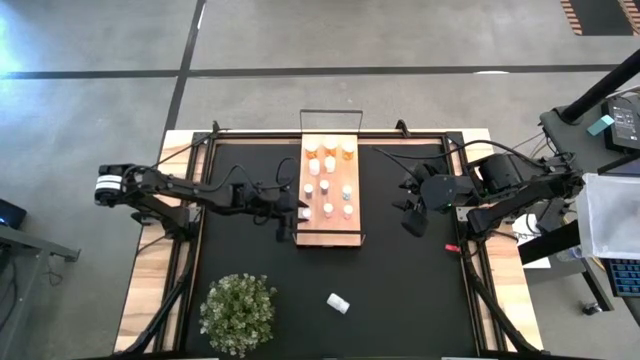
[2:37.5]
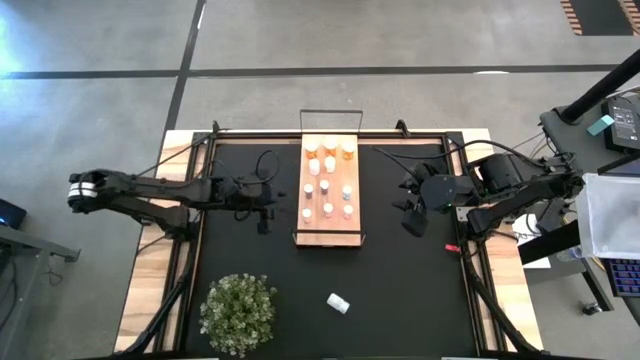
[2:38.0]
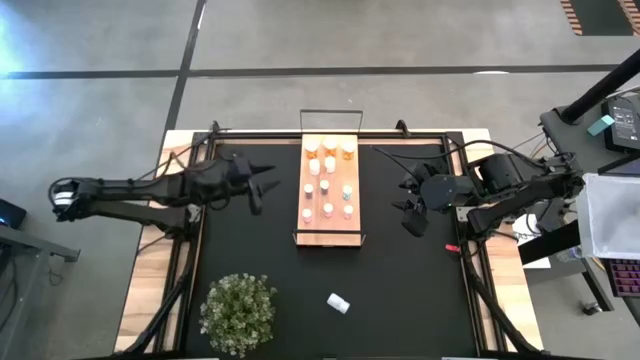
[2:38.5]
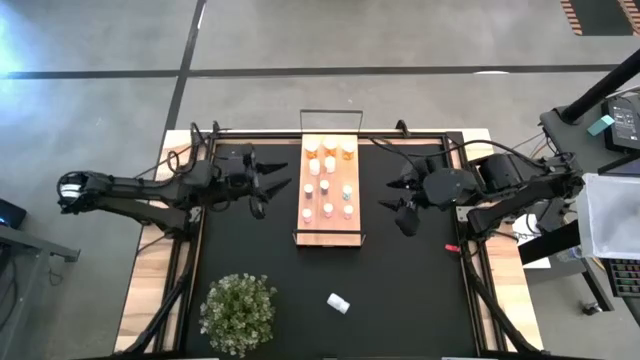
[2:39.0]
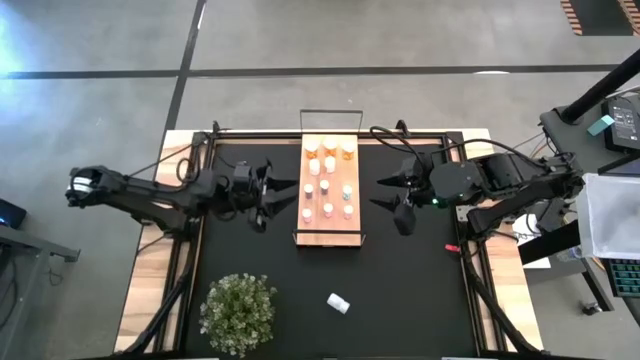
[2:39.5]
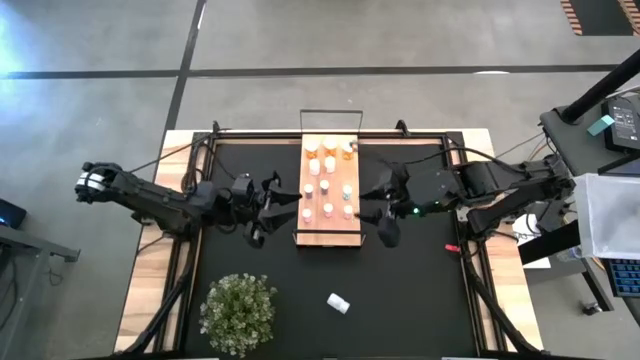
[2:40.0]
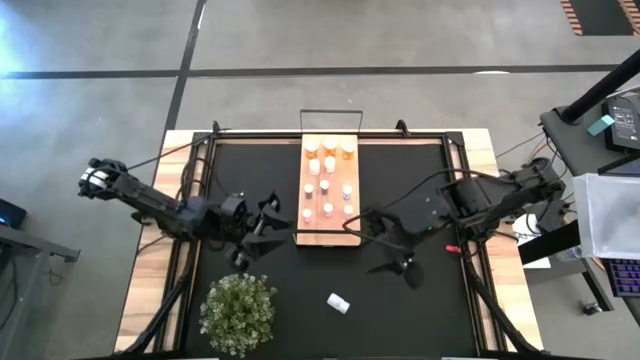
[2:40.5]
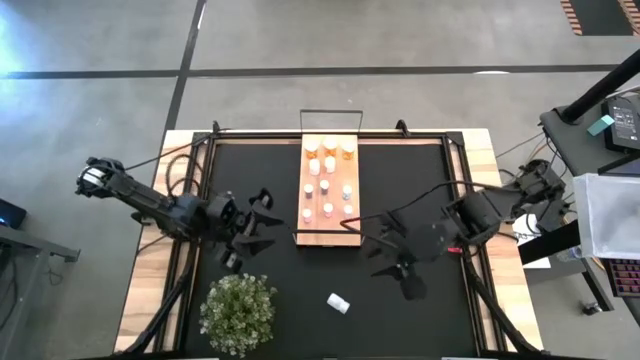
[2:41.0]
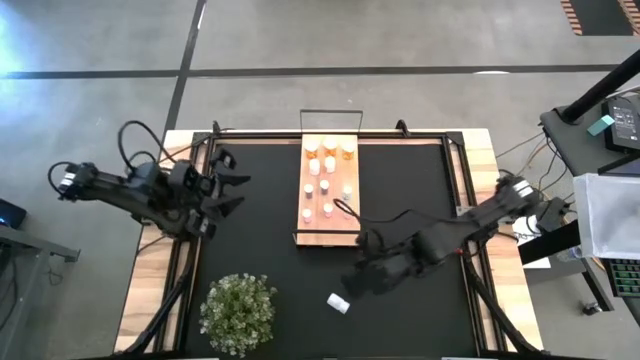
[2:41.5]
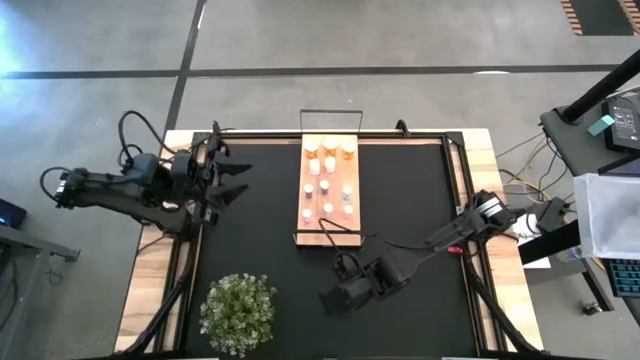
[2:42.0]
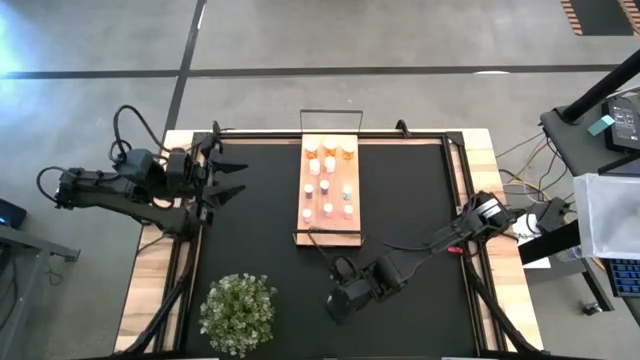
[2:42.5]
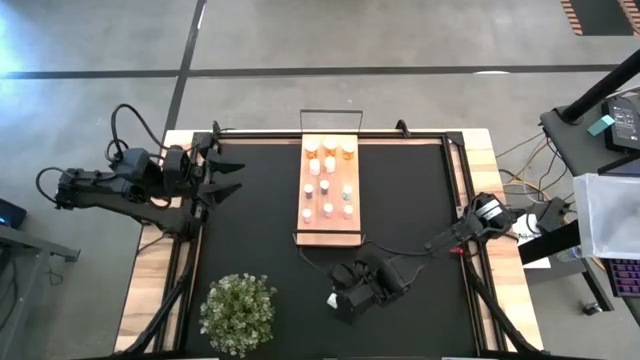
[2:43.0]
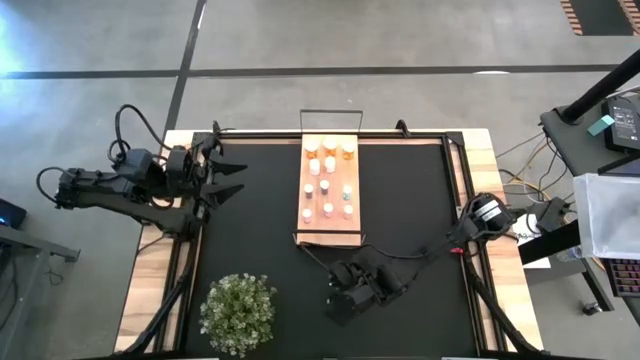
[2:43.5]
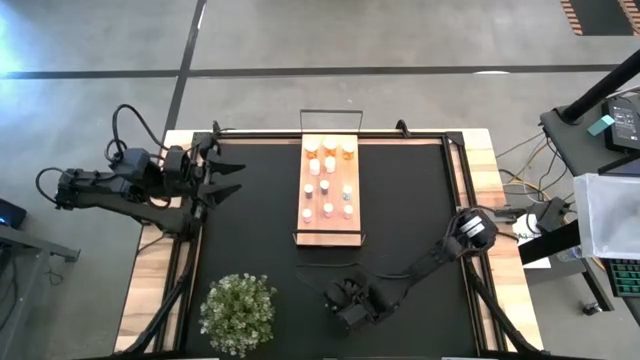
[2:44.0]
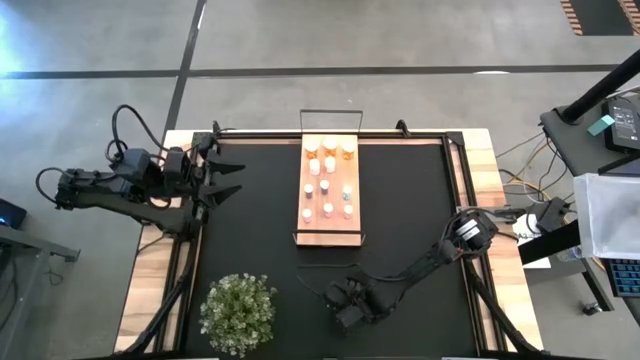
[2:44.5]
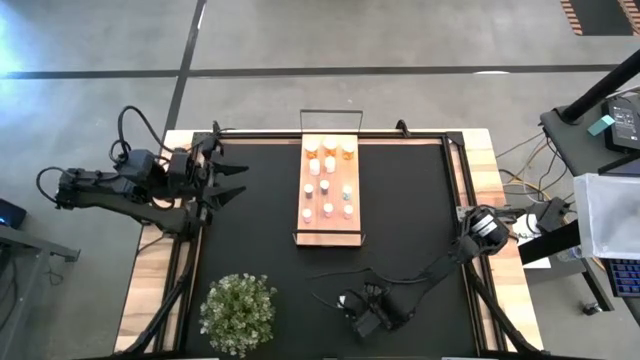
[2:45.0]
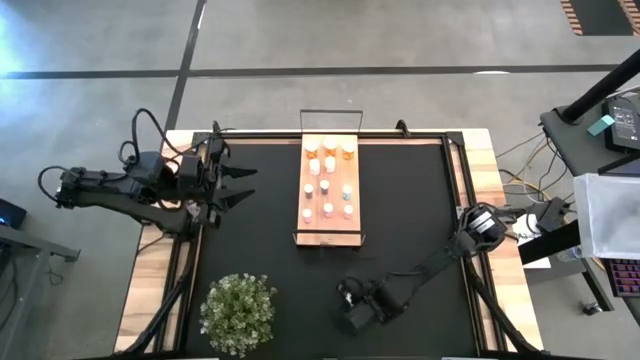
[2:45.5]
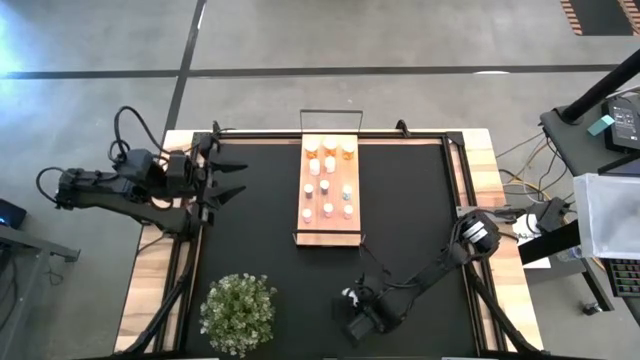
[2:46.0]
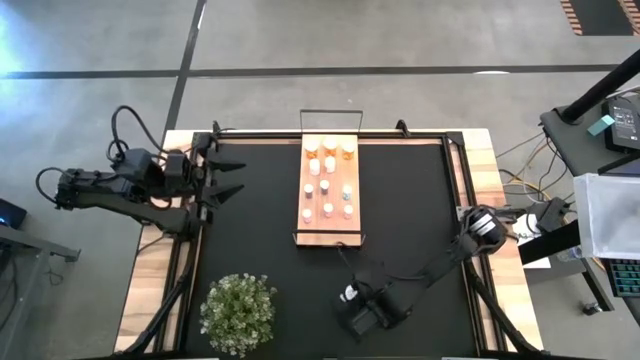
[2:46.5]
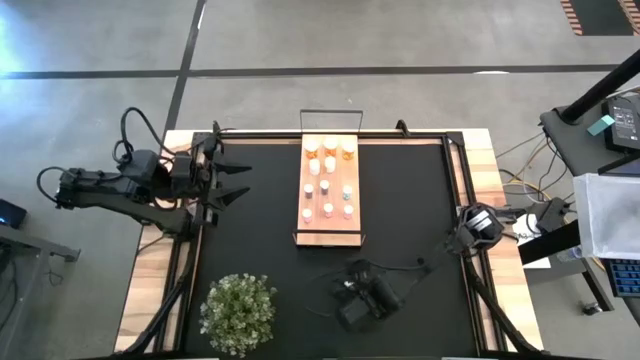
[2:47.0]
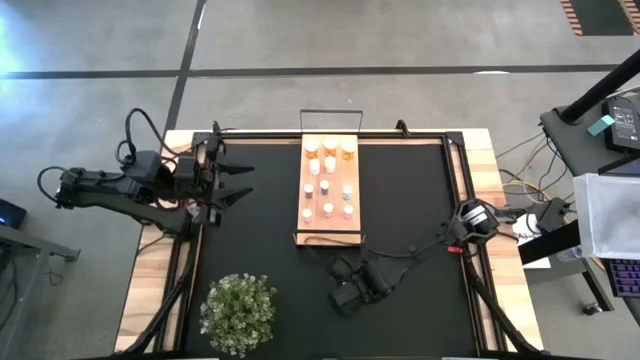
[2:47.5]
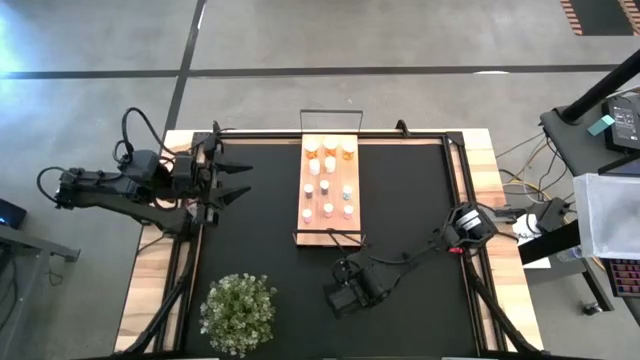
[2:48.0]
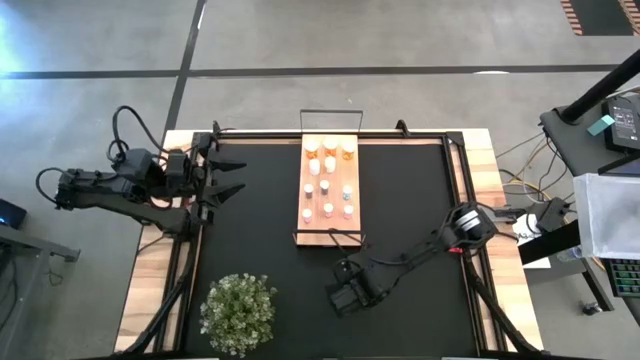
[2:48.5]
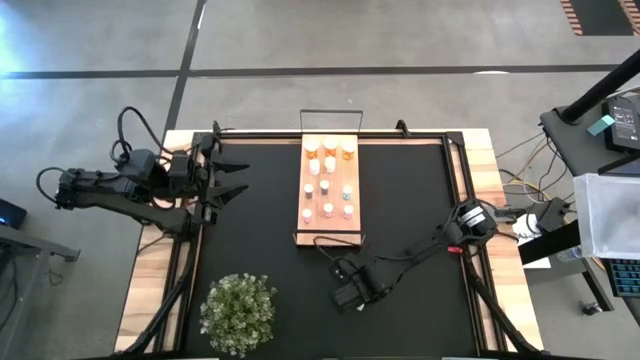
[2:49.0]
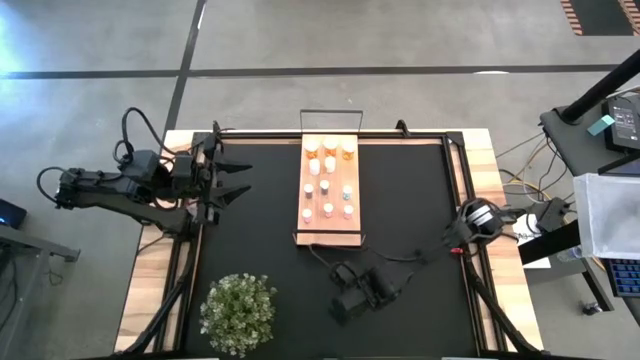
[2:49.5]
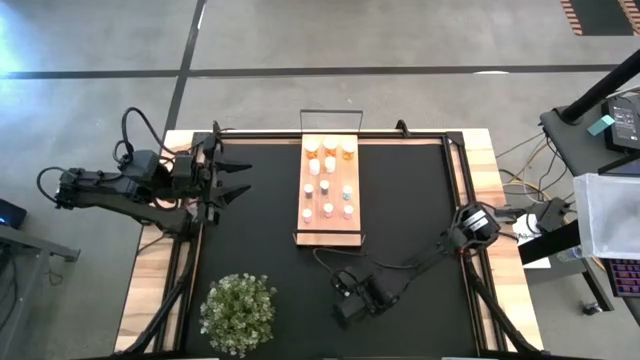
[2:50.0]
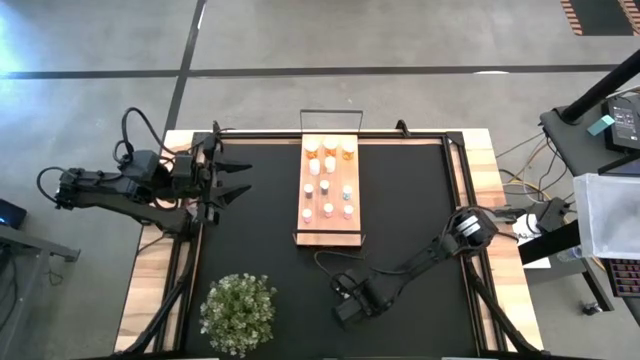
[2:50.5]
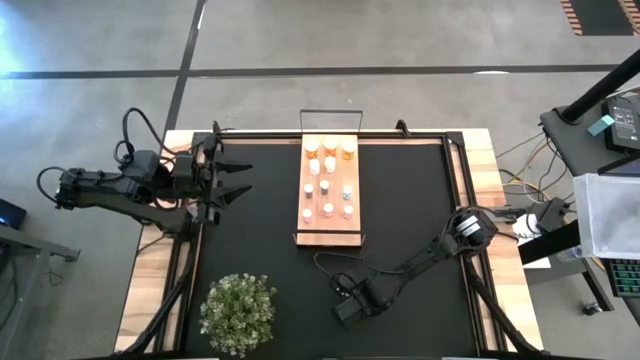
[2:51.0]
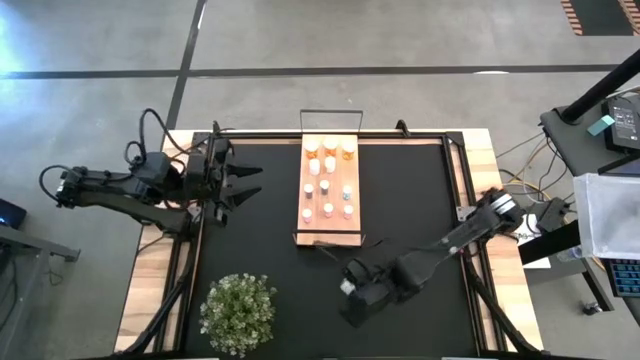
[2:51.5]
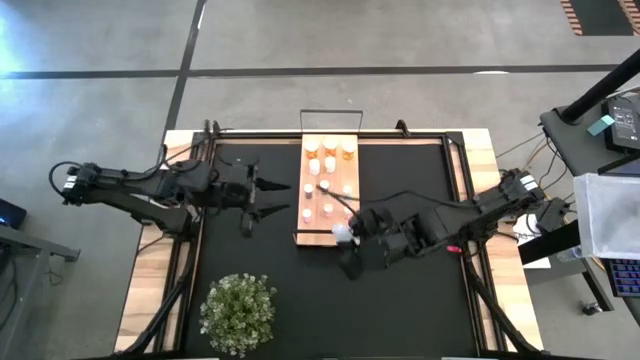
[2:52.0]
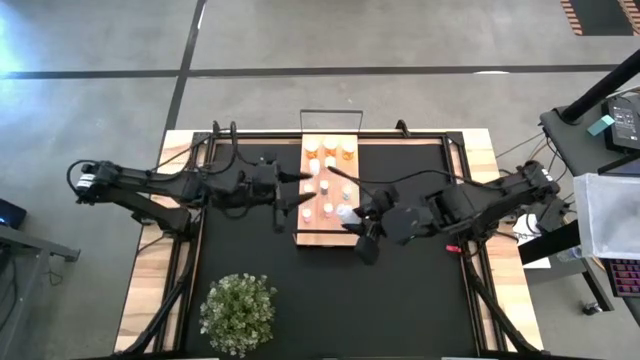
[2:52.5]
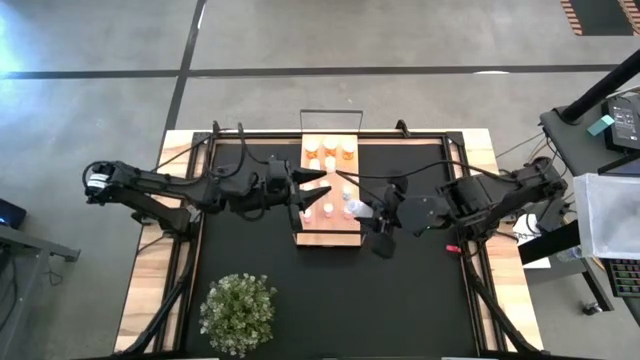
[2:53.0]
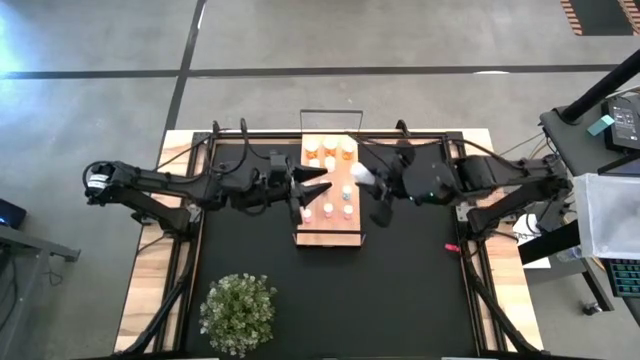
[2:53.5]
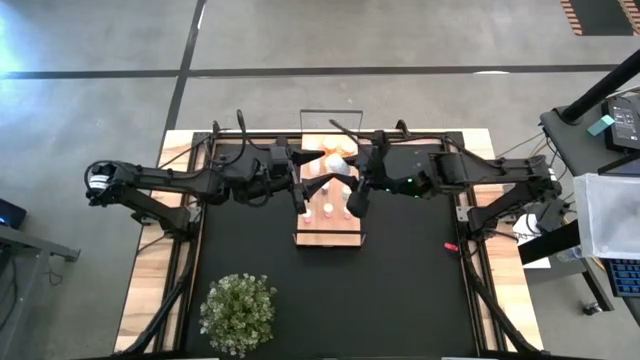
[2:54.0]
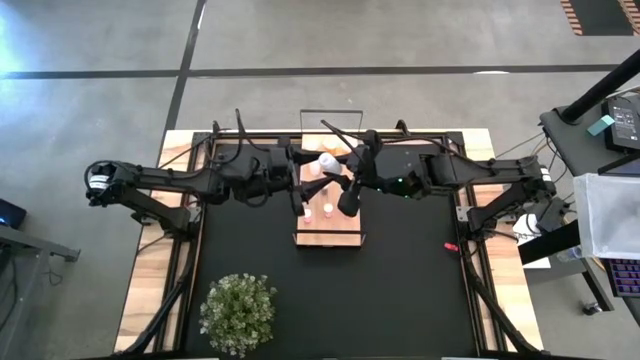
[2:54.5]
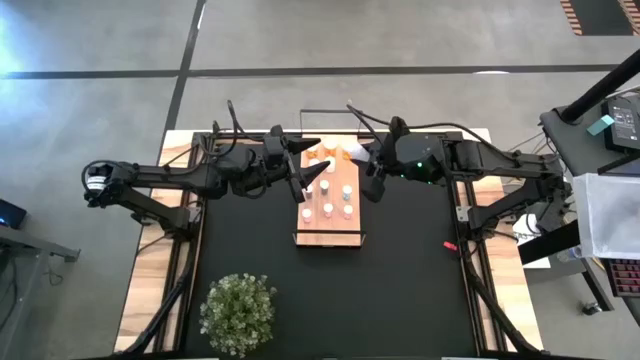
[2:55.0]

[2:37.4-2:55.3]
Task: Pick and place medicine bottles onto shelf by color
Put the white pill bottle on the shelf aligned with the other white pill bottle

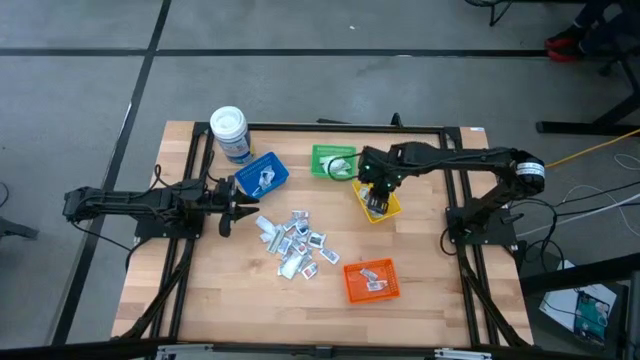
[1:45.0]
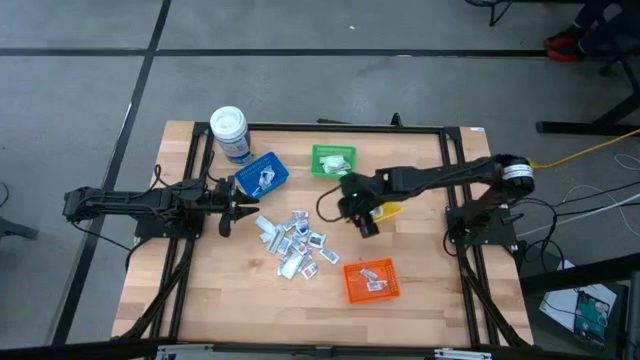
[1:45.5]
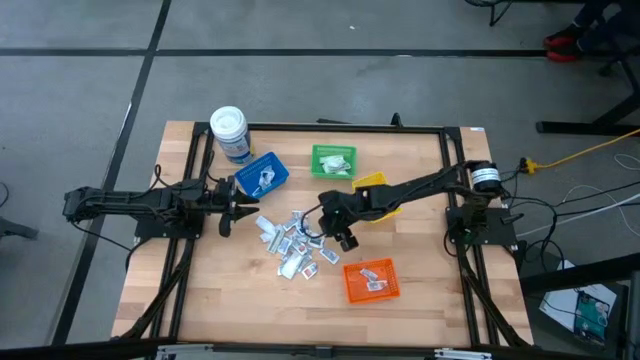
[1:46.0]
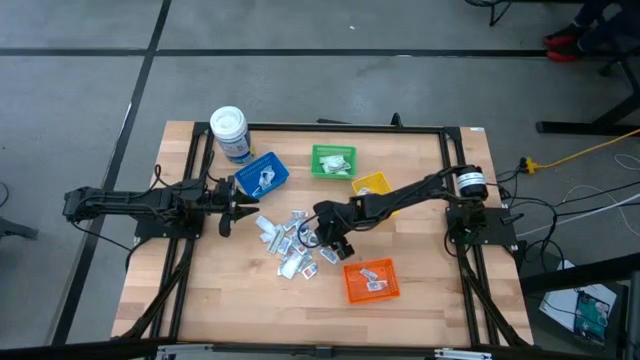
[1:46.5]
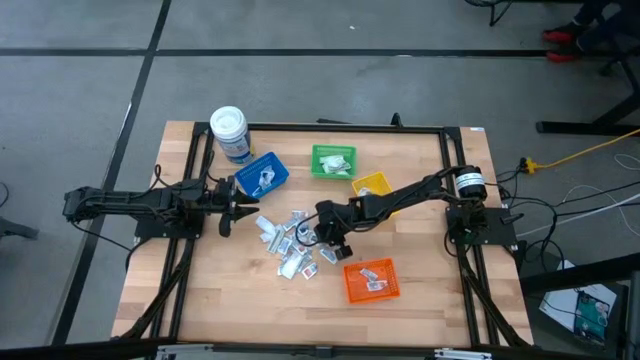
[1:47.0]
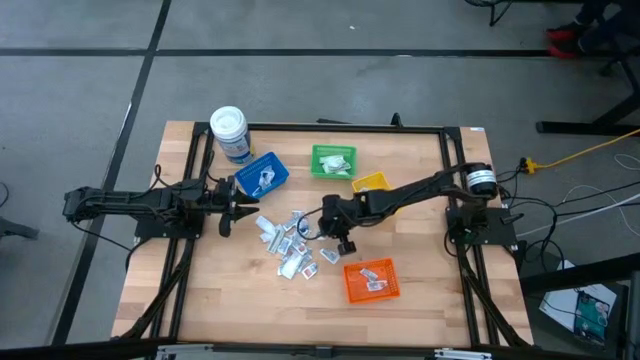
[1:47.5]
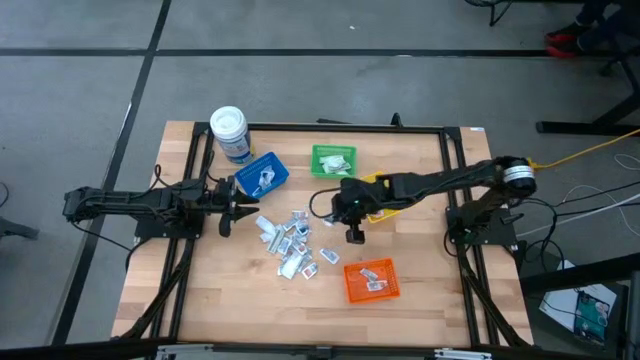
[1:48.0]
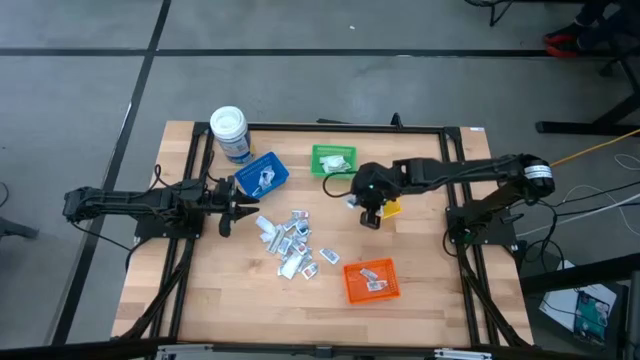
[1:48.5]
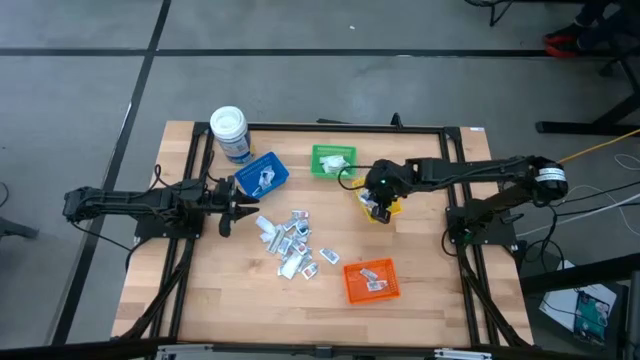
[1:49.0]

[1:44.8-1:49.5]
Task: Pick & Place First Aid Supplies
Put the white towelette pack into the yellow bin
